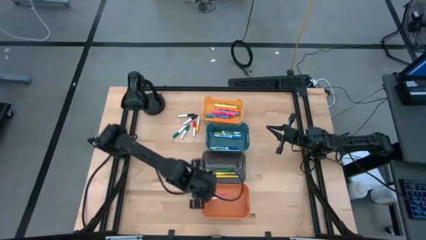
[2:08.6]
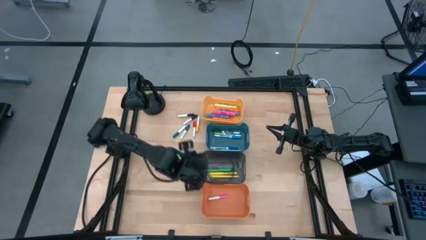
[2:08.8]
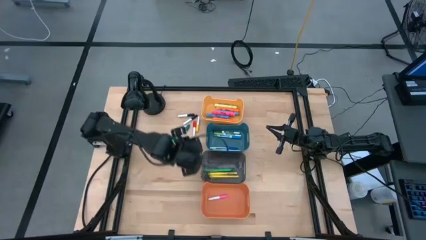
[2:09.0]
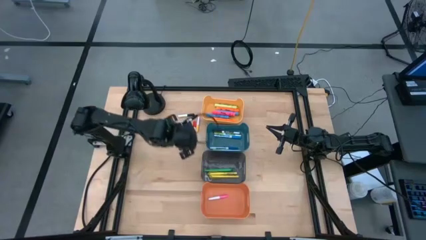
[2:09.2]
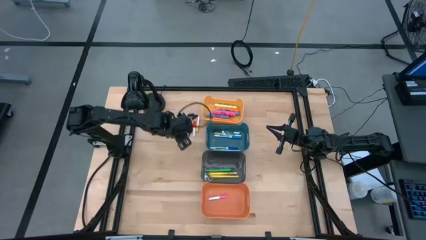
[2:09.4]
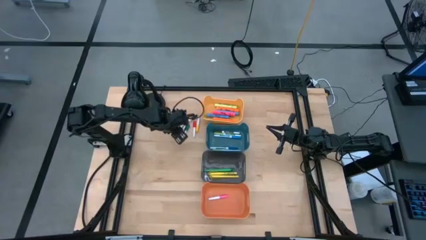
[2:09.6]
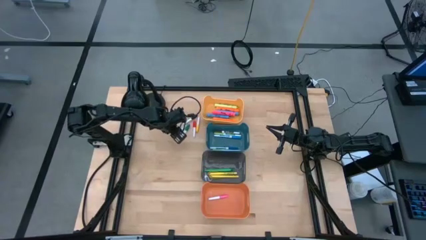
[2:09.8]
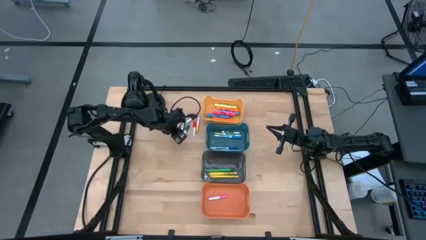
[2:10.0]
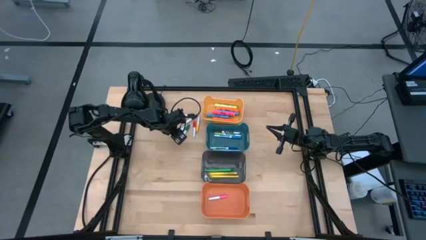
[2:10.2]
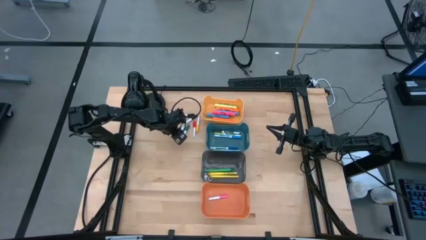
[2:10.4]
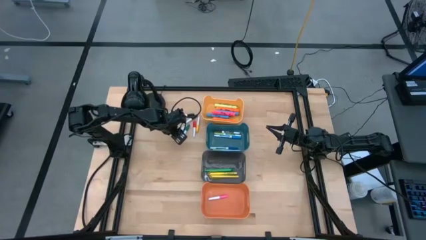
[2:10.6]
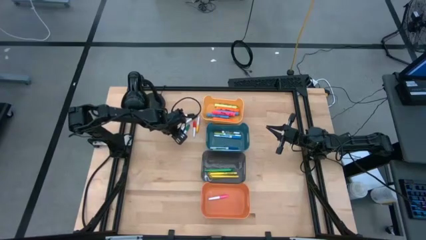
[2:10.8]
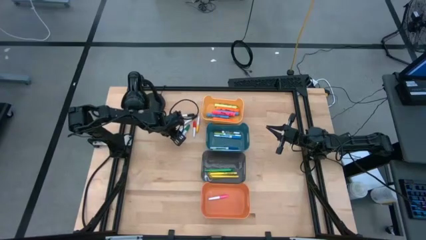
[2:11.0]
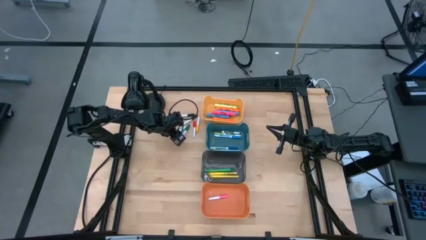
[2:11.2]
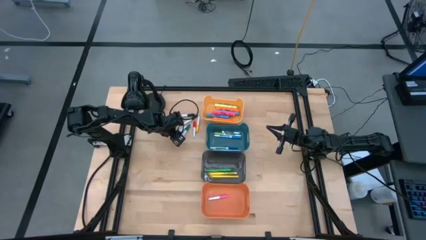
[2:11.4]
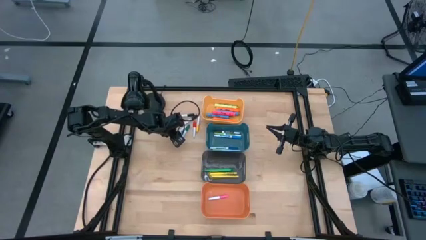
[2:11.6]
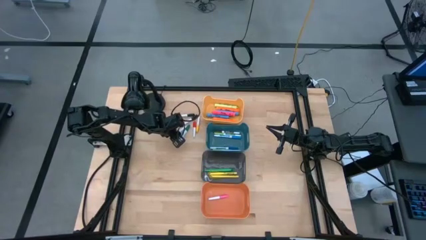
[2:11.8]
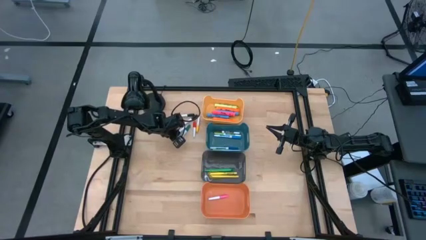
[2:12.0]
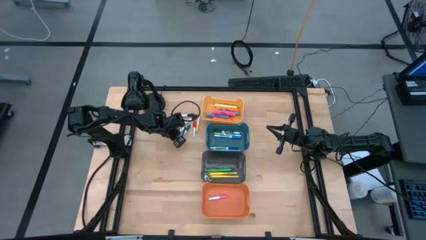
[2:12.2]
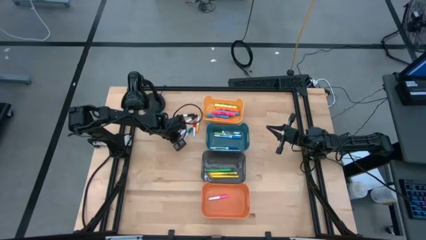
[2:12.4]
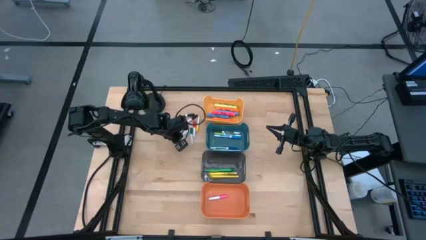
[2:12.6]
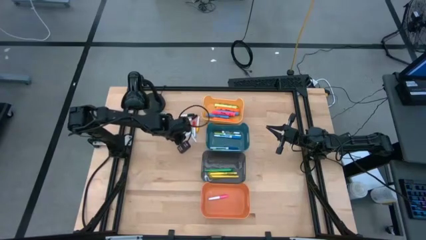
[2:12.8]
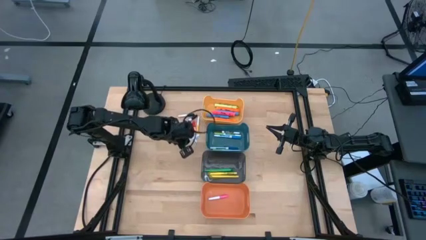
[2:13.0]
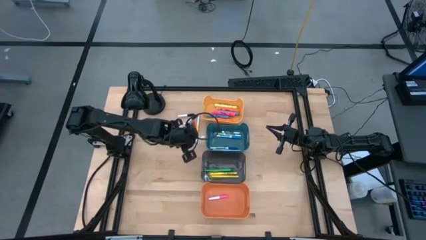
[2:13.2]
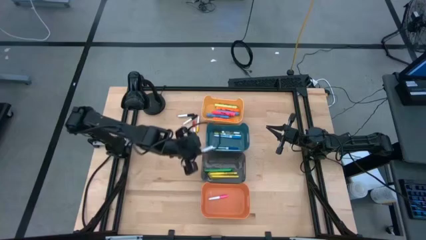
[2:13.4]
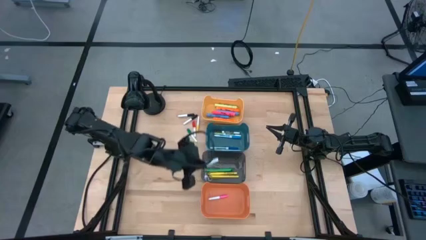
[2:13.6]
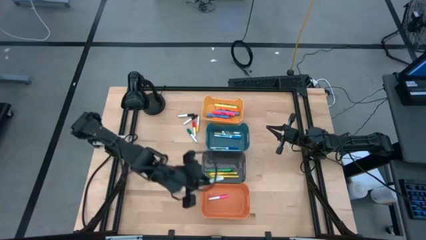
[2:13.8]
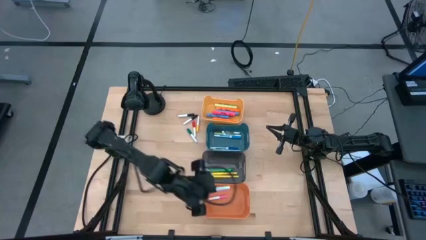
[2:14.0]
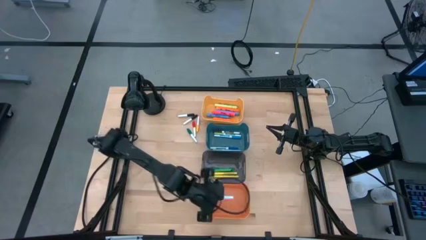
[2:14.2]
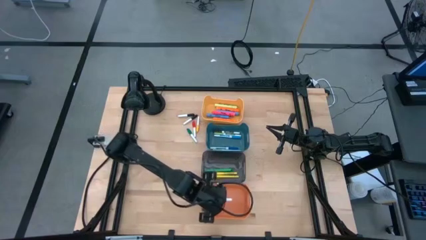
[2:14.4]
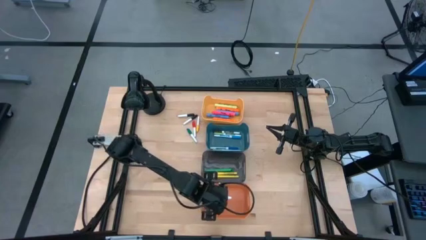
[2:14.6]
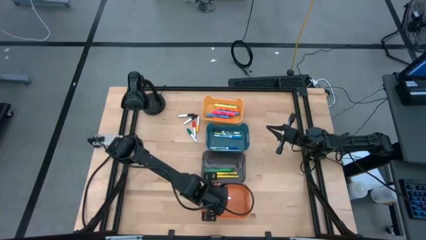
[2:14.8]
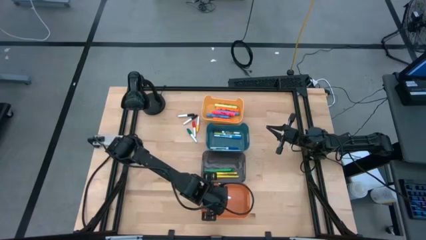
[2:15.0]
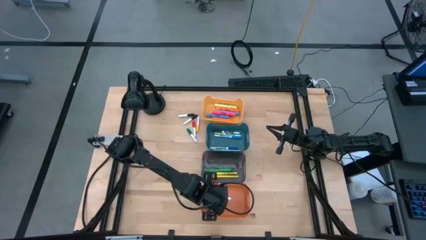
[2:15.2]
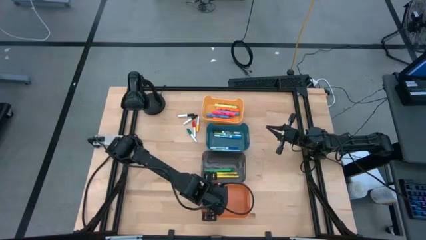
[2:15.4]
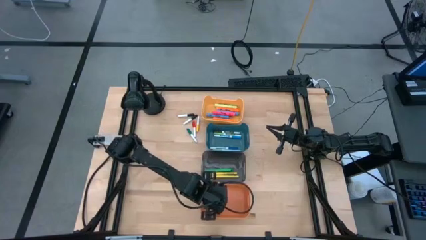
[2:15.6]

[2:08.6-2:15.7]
Task: Pick & Place Markers
Put the left green mini marker into the orange bin

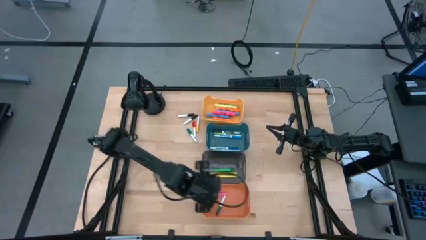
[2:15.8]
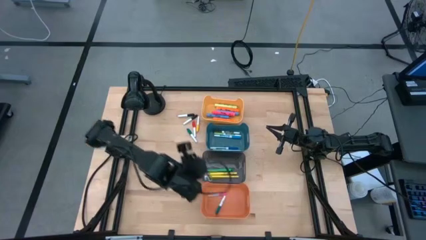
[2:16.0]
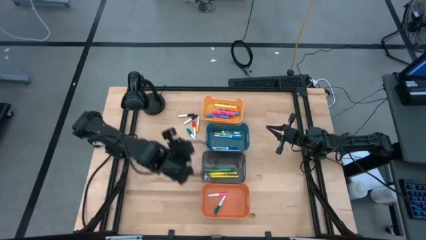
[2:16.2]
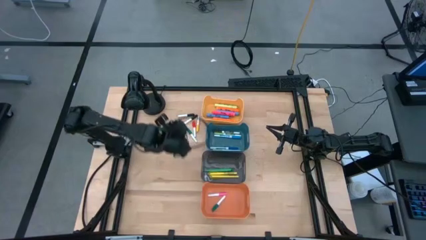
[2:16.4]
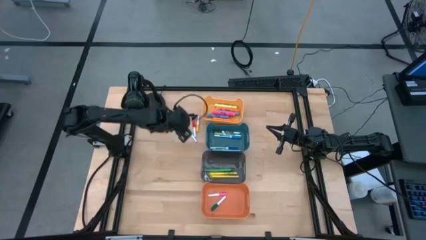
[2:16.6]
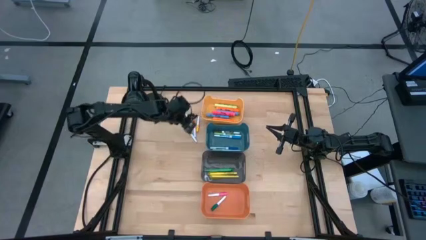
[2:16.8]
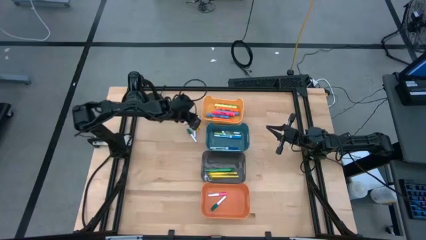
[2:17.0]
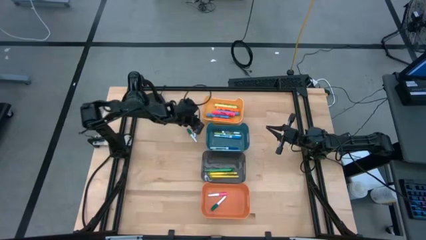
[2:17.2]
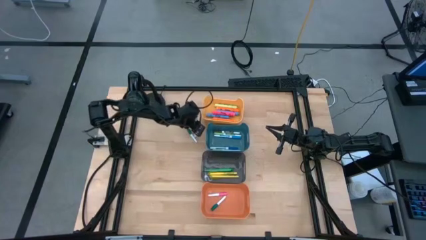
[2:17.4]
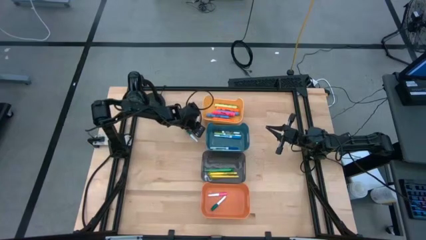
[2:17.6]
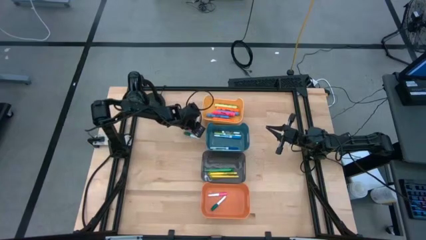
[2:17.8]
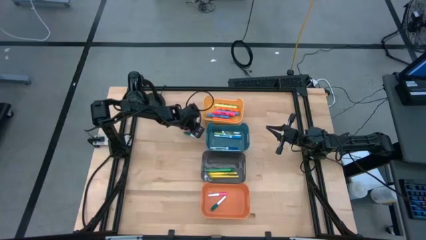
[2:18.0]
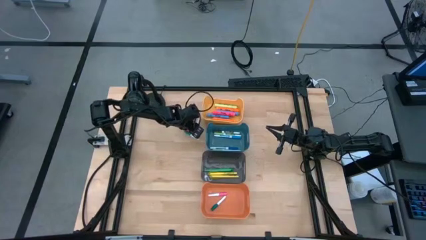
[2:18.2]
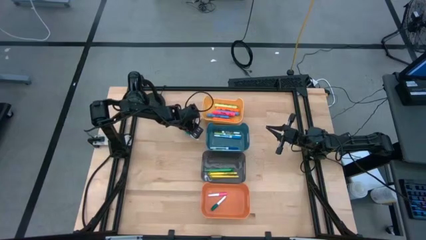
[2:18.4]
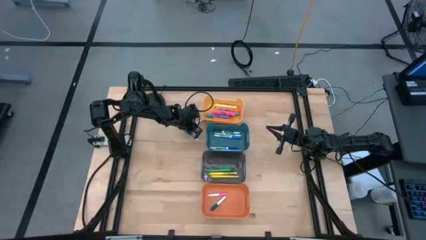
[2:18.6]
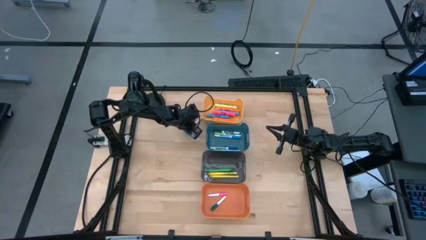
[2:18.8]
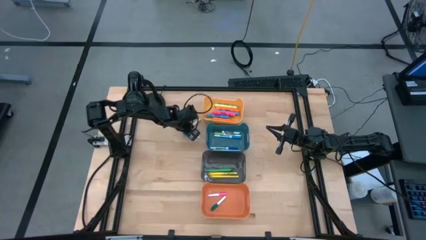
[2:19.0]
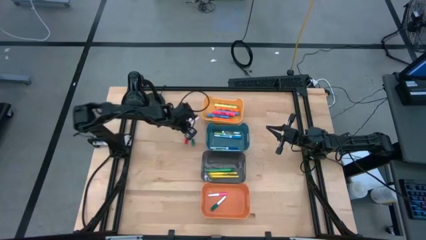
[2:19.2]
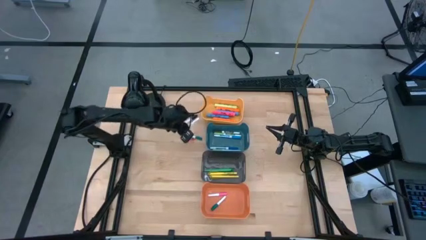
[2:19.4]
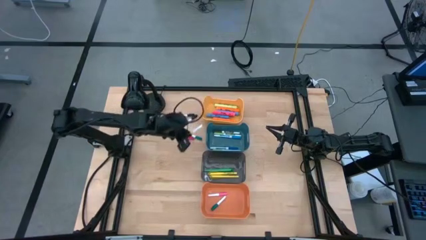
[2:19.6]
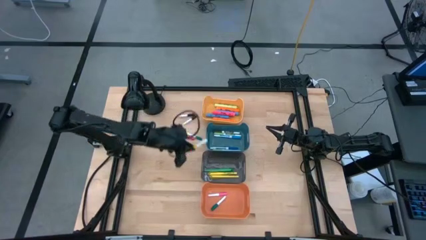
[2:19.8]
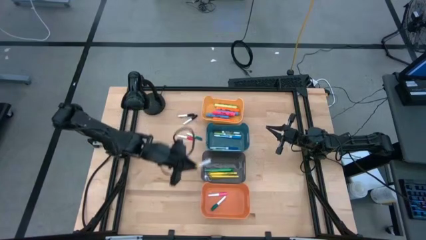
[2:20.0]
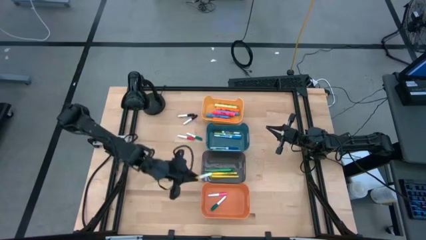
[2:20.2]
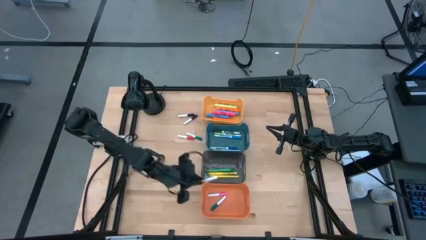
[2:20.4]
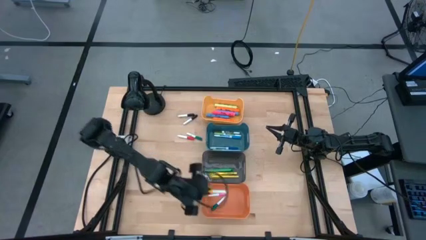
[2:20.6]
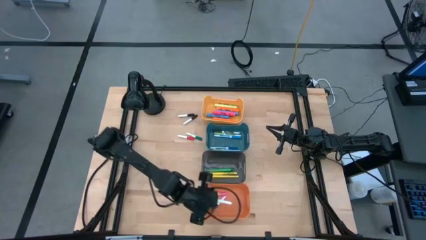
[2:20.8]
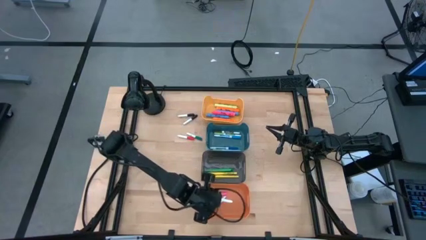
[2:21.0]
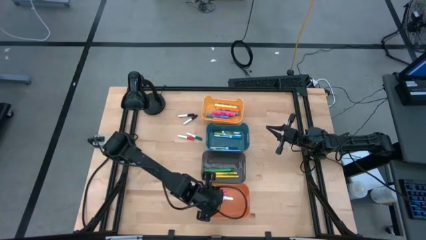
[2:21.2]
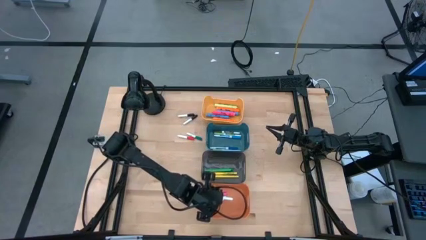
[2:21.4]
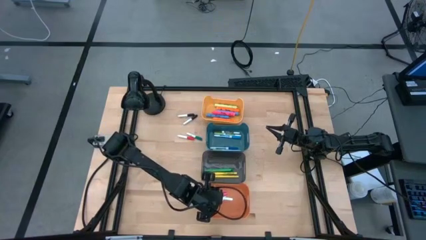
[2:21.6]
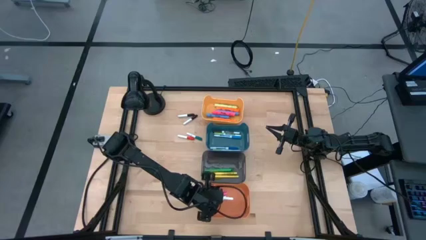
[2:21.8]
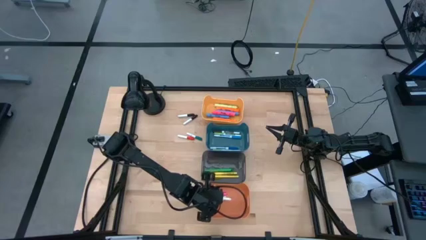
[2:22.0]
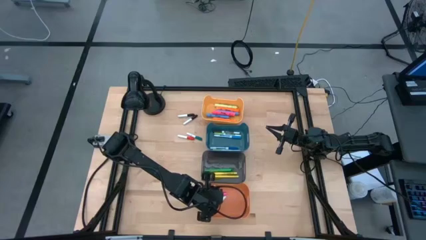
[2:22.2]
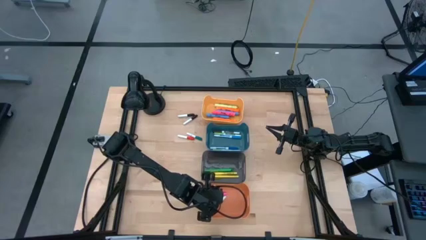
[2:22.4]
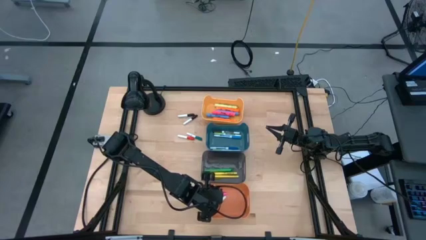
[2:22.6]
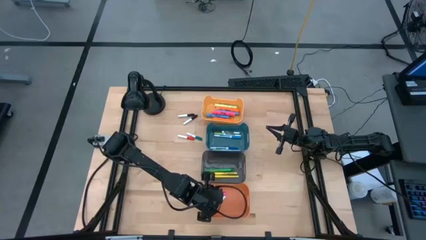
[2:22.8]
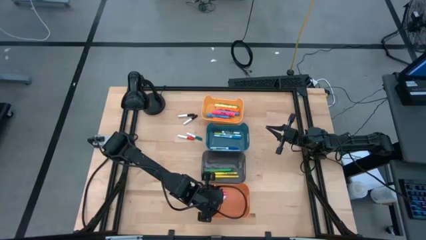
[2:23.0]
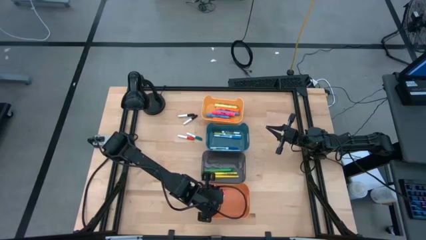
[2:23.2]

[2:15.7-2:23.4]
Put the yellow mini marker into the orange bin

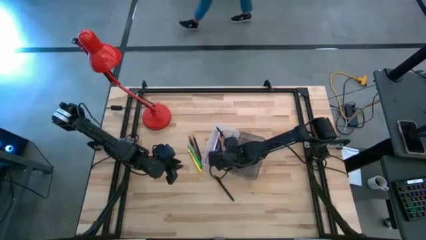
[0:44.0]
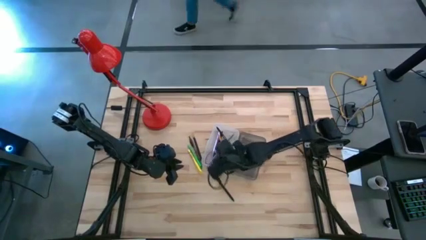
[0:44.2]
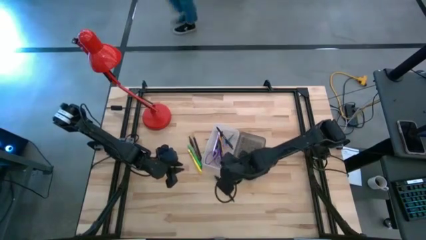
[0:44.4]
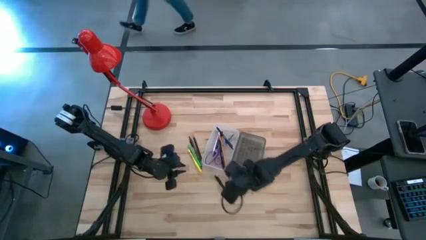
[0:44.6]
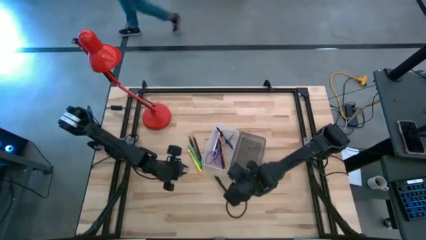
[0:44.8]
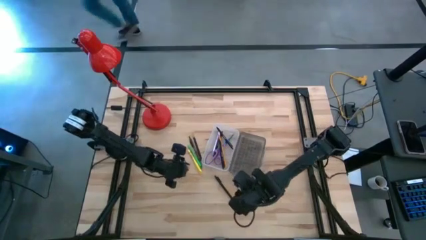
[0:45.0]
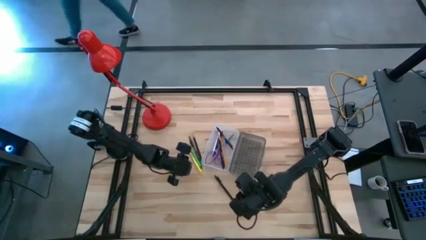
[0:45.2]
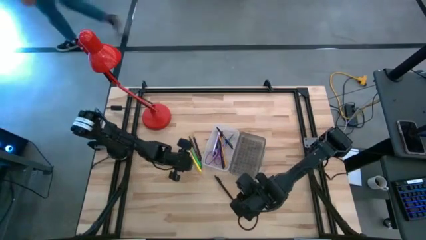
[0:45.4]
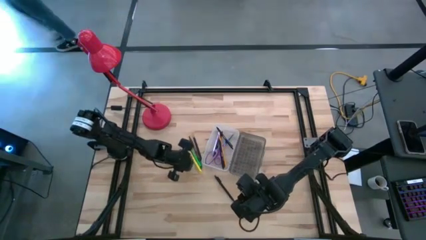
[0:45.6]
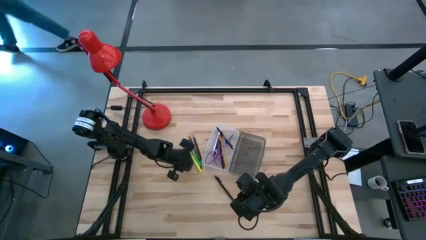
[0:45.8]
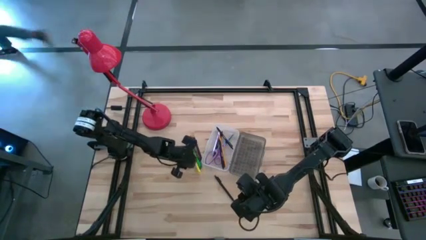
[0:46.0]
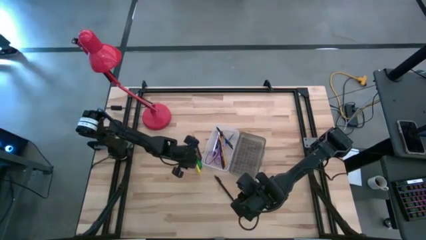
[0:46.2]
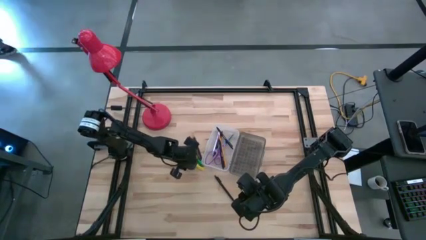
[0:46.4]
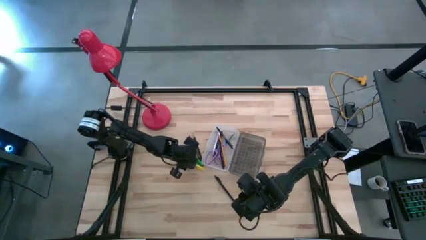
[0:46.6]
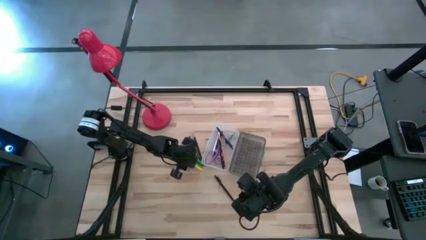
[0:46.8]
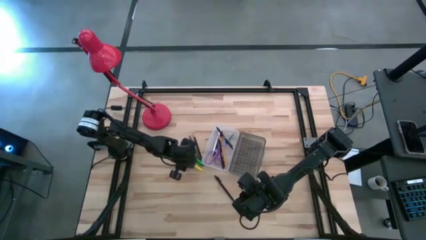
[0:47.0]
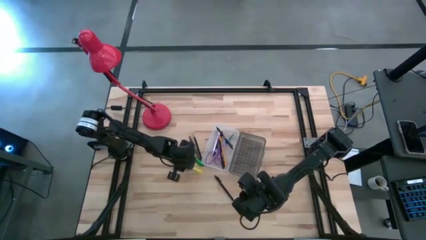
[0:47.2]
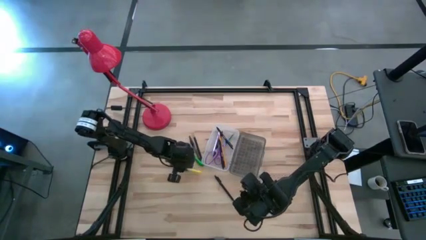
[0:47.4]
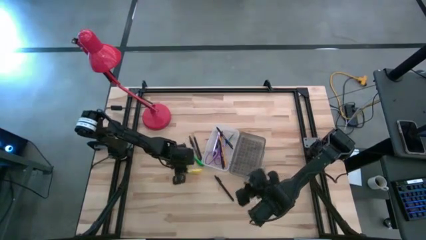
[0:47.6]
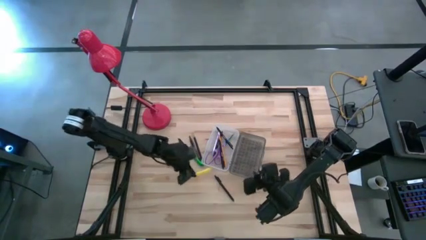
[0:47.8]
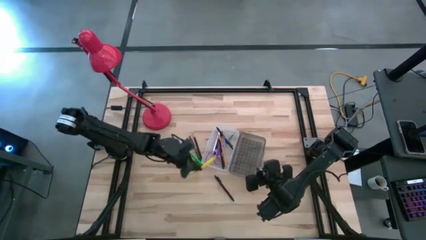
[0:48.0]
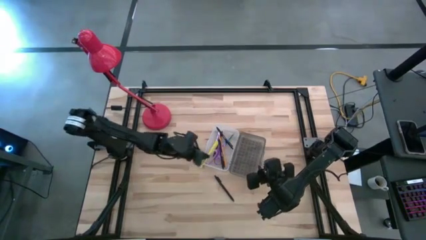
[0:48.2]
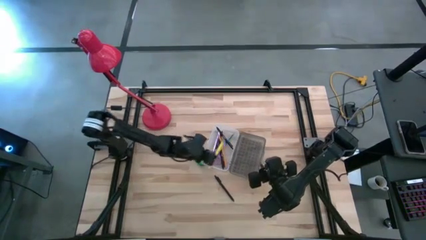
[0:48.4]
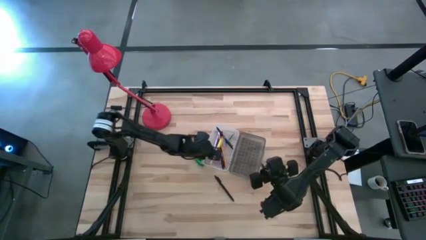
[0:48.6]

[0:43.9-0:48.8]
Task: Pick & place school supplies into a supply box
Put the yellow pen into the supply box
